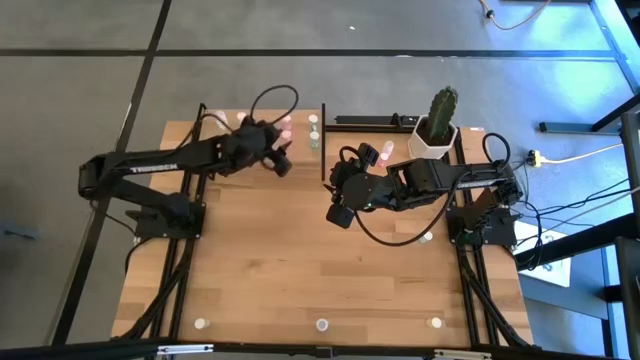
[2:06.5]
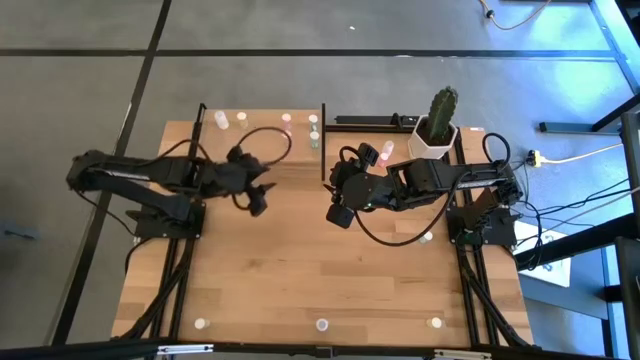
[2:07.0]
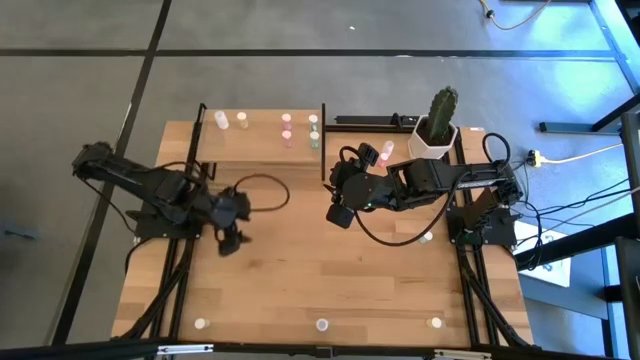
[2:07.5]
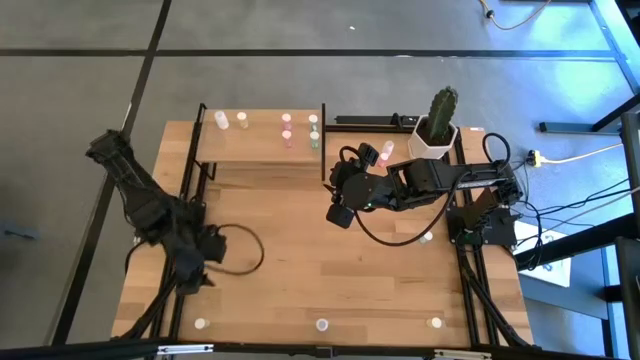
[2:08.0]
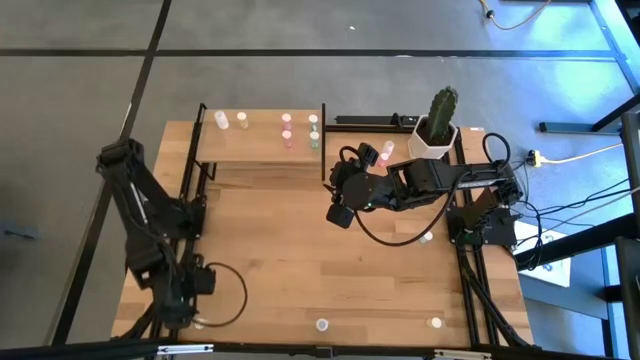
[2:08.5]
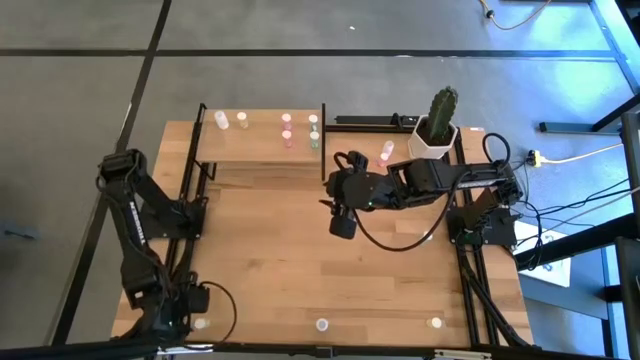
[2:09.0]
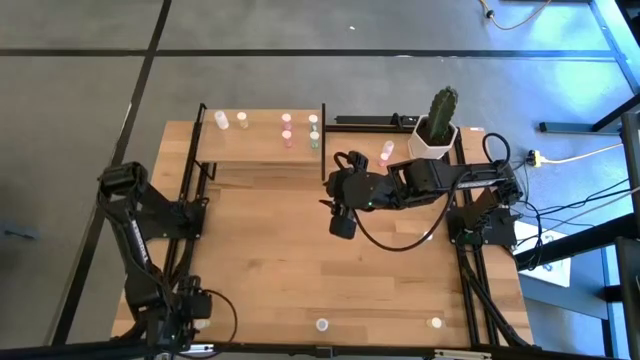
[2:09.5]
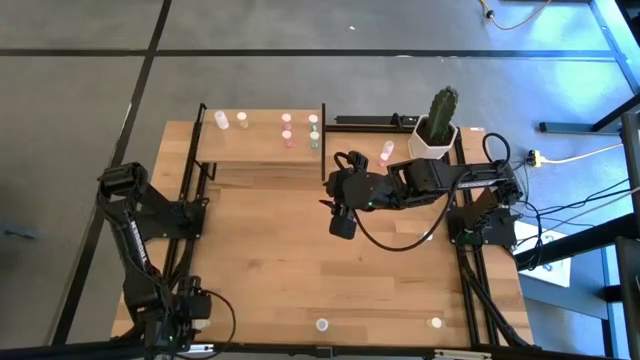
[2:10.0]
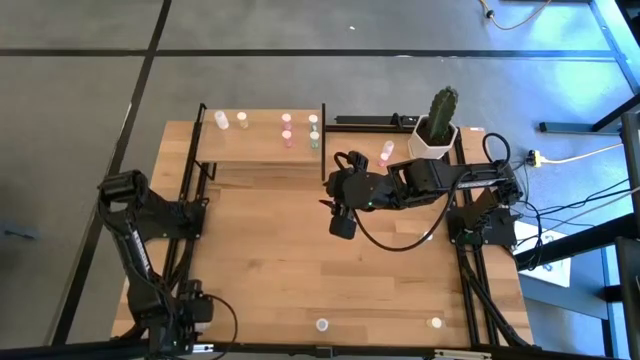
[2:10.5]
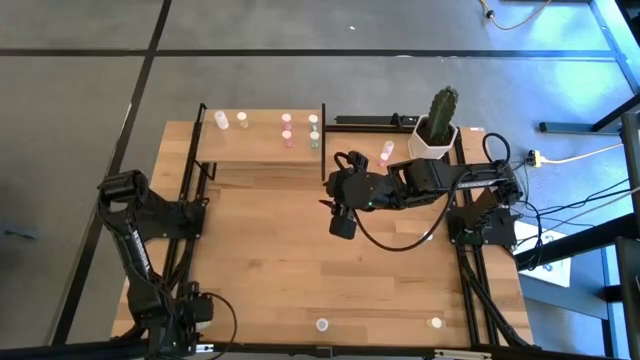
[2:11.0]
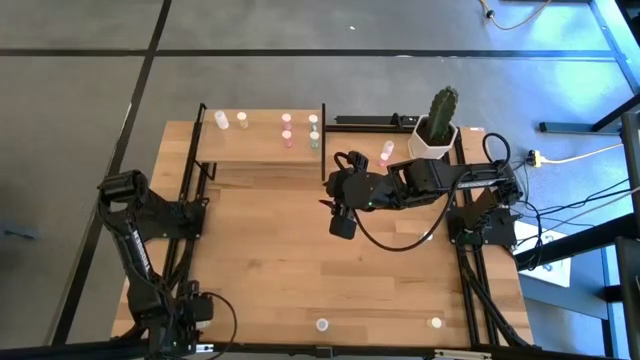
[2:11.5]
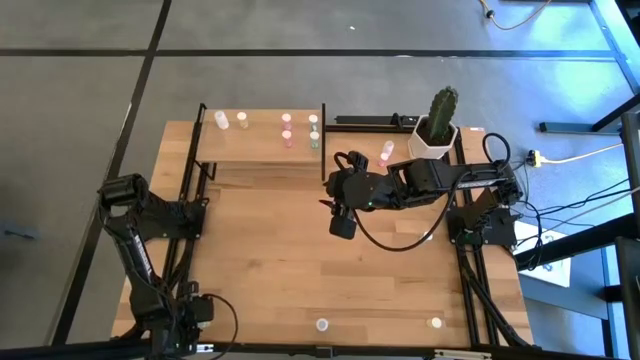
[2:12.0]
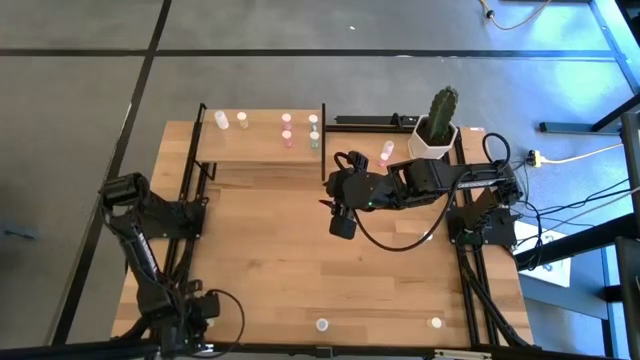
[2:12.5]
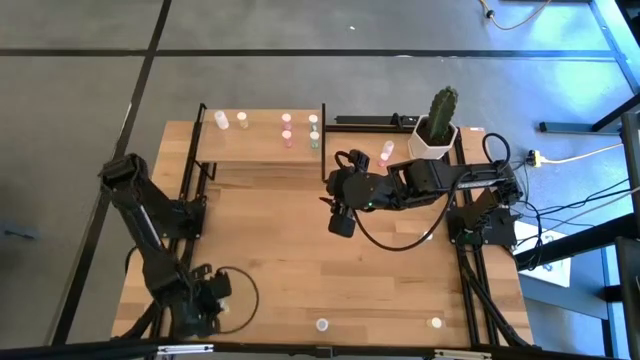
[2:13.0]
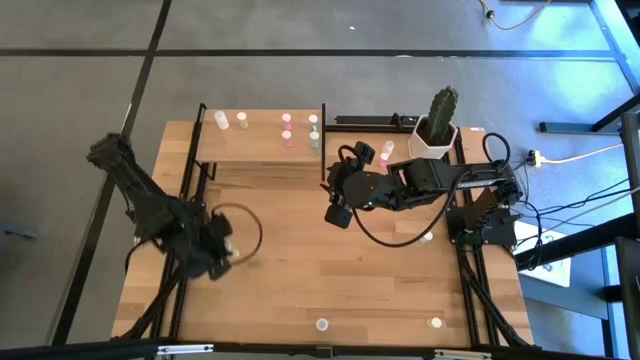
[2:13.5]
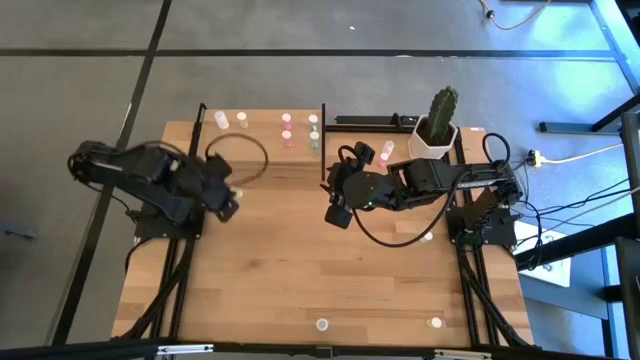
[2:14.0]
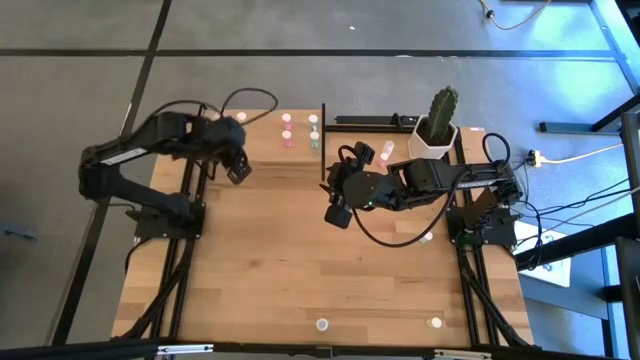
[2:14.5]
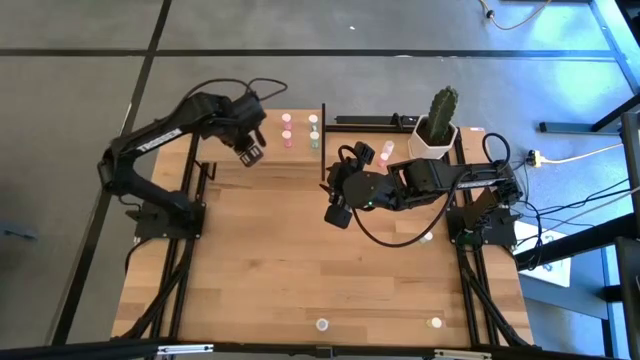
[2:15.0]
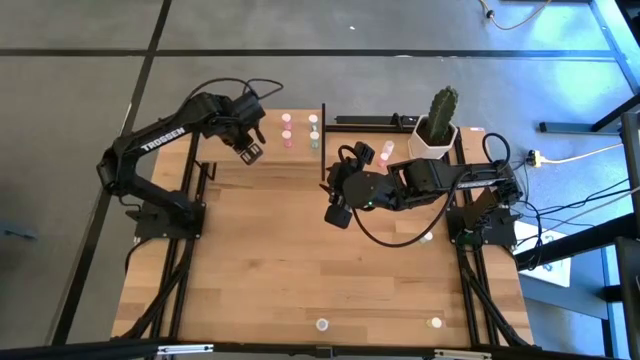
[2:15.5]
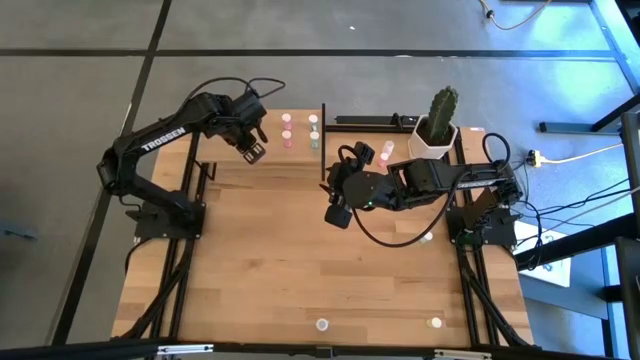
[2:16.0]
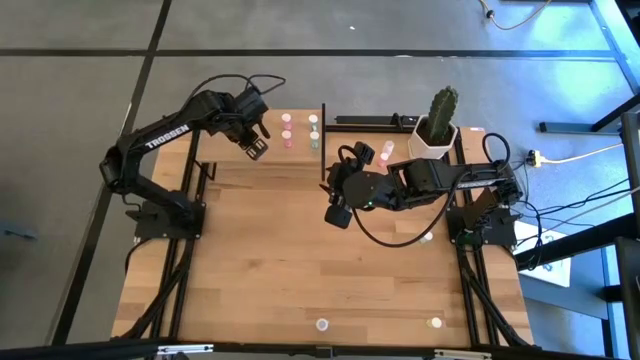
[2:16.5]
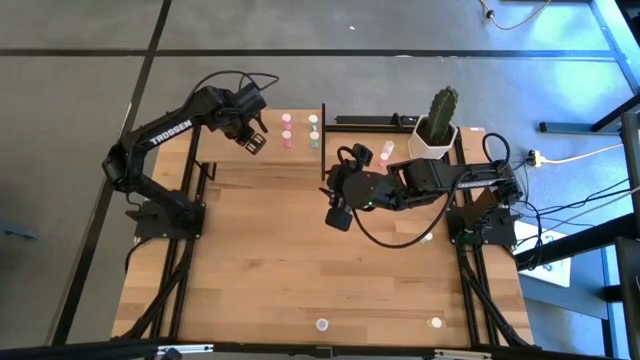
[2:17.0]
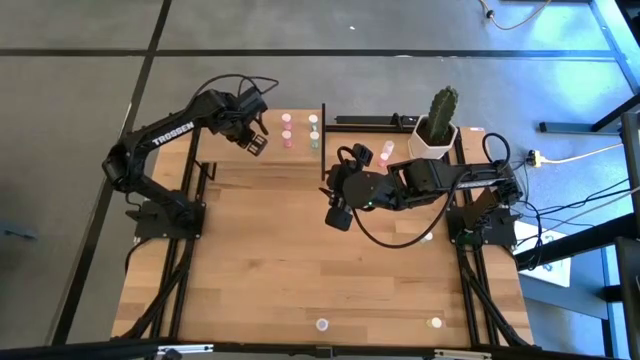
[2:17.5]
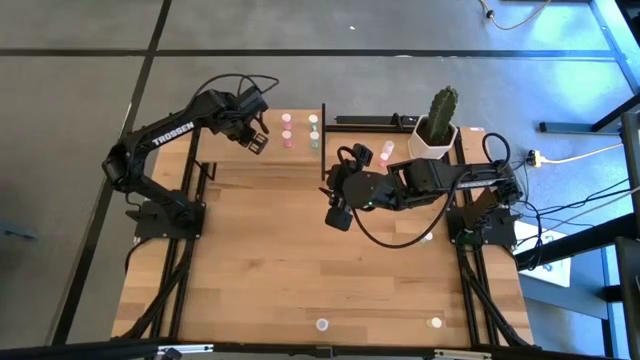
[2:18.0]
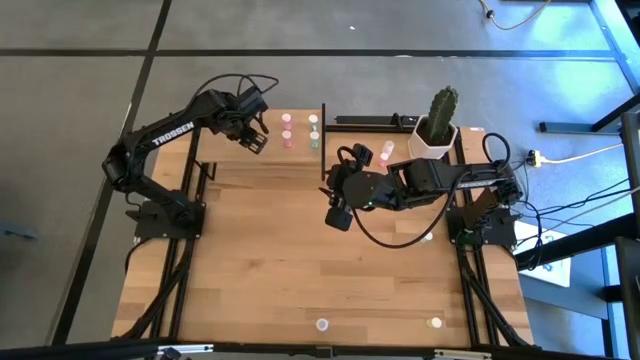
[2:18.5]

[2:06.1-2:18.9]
Task: Pick and place medicine bottles onto shelf by color
Put the left yellow pill bottle on the shelf and align it with the other yellow pill bottle

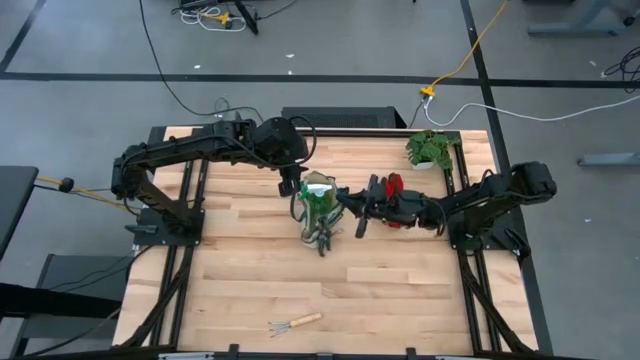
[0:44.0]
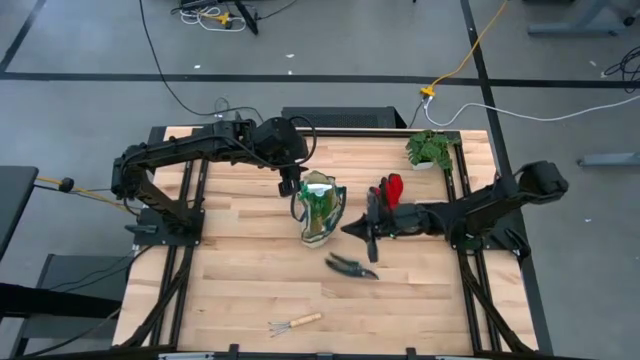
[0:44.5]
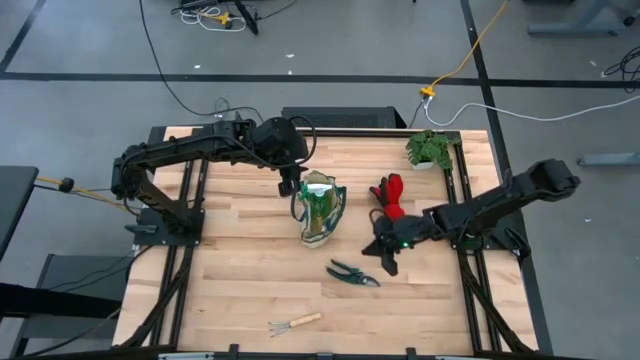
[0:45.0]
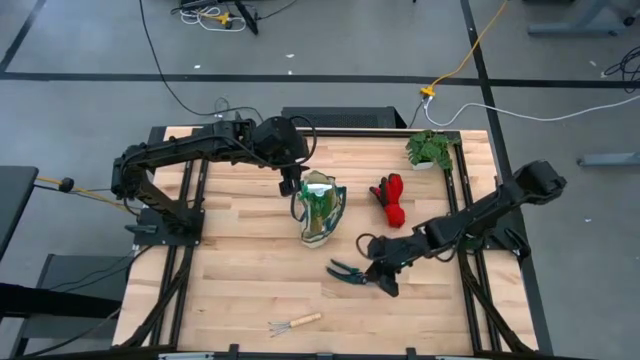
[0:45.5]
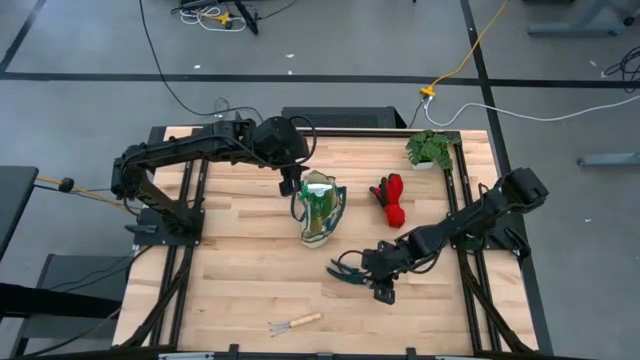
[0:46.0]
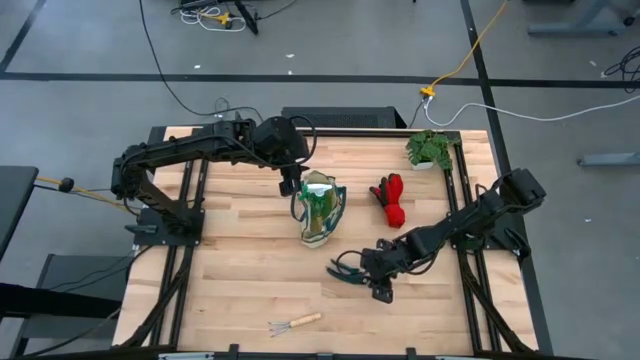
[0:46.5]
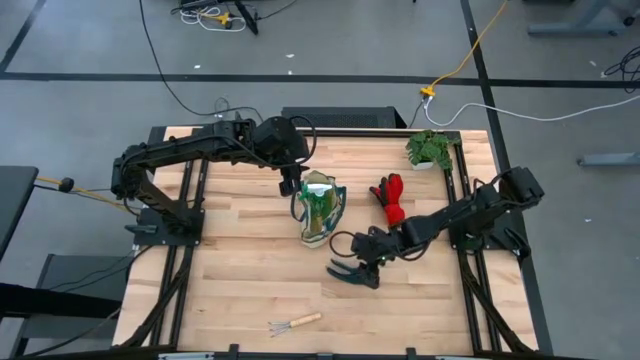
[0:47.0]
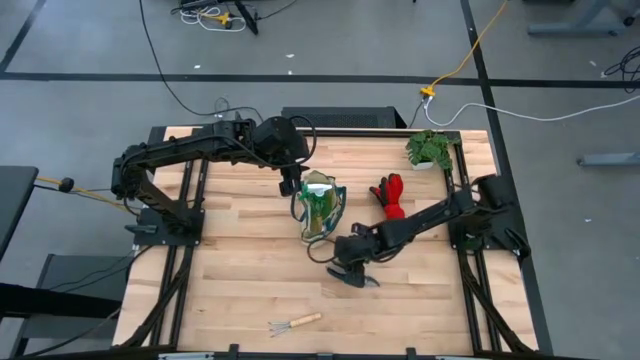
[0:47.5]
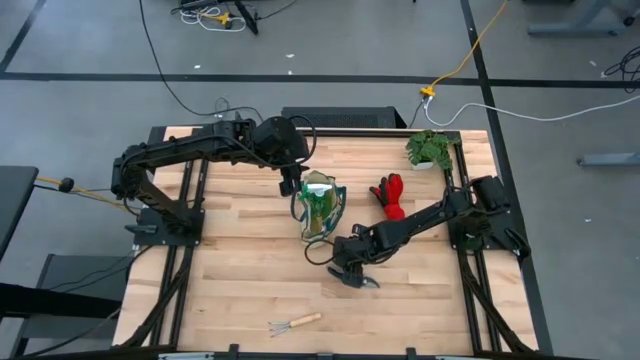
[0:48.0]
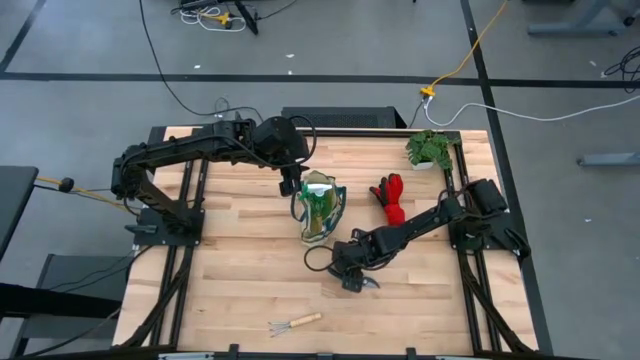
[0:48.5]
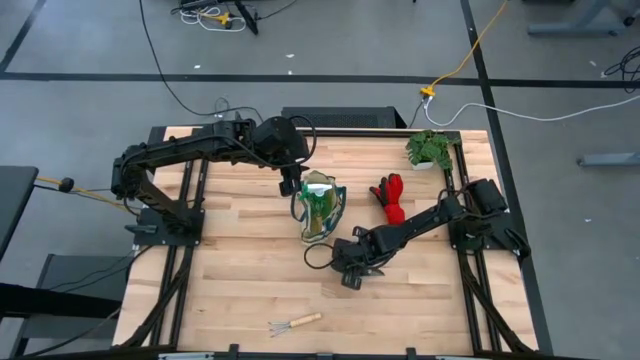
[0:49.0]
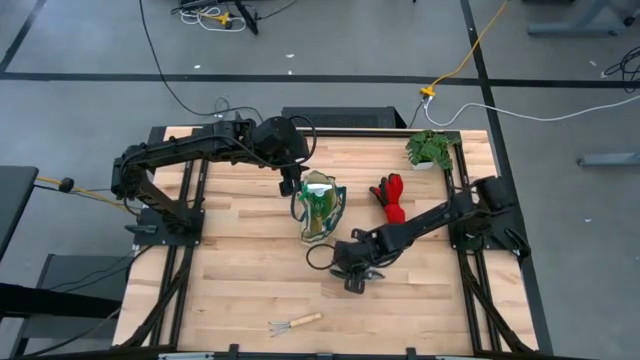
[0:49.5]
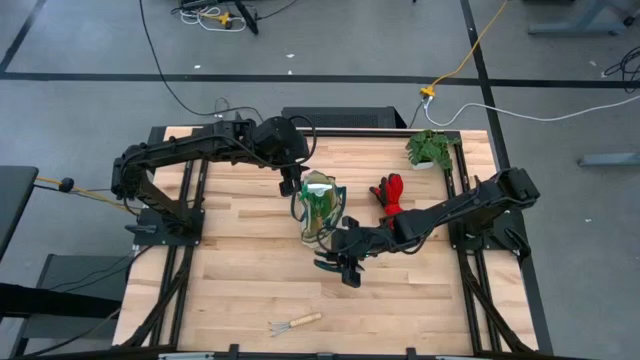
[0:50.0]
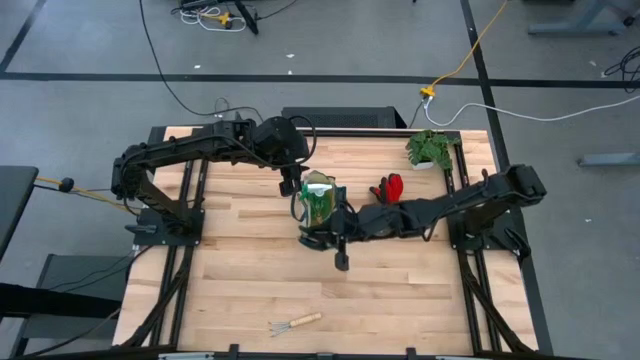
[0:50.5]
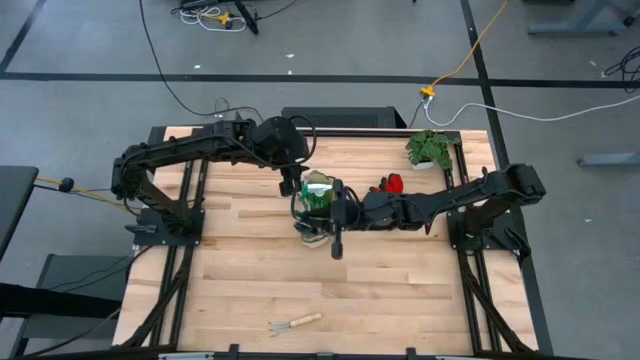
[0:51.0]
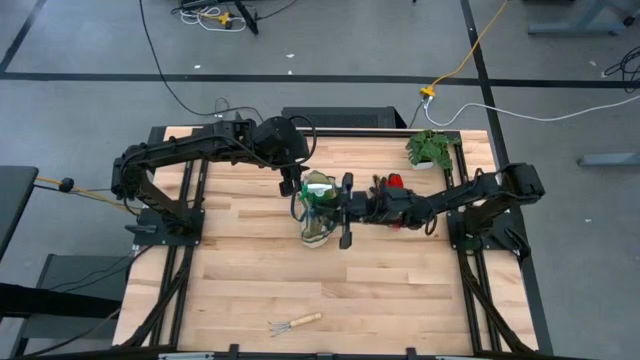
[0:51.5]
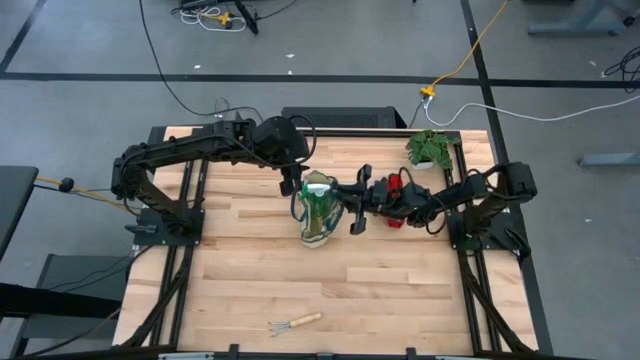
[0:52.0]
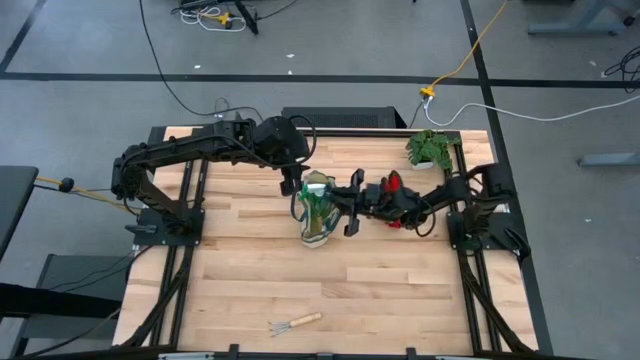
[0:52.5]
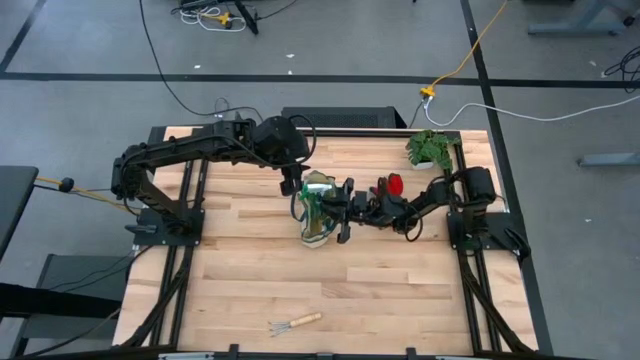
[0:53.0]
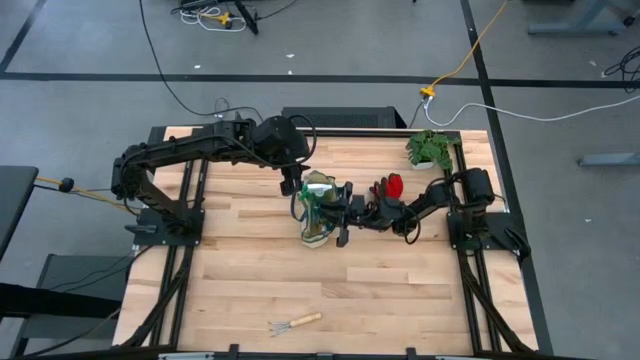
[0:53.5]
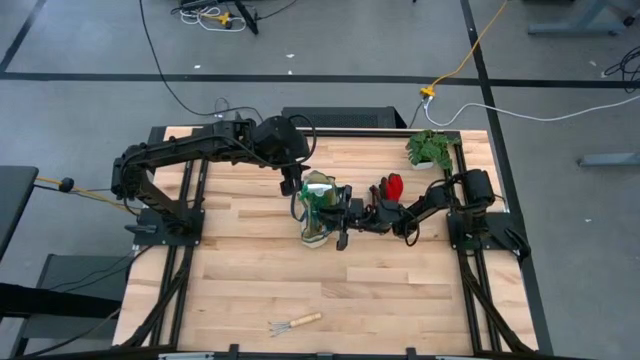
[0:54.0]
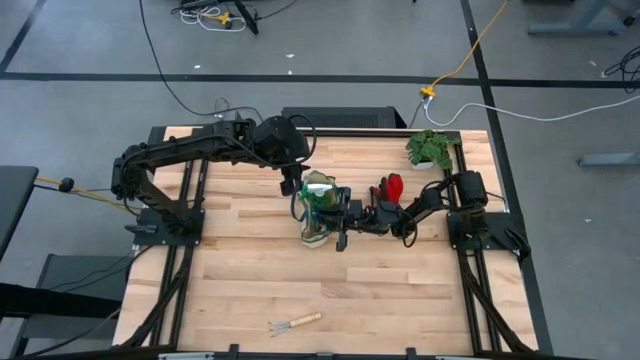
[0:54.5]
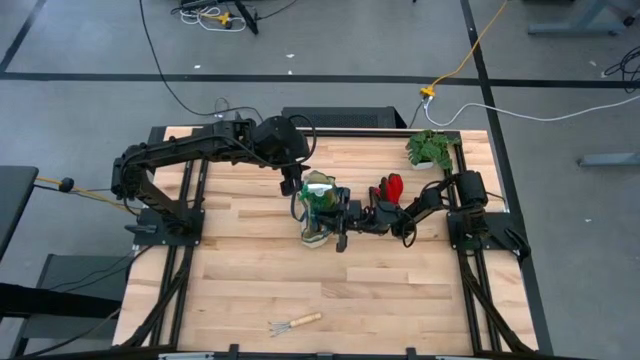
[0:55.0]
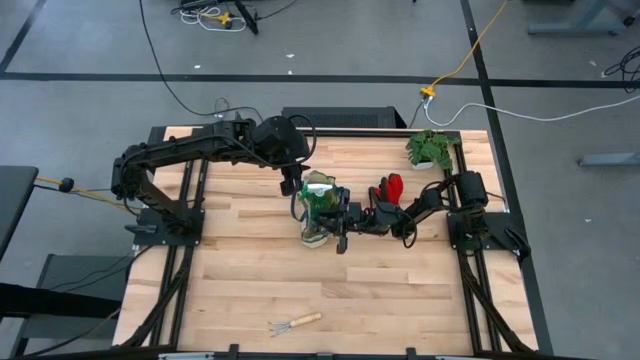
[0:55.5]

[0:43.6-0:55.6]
Task: Pick & Place Garden tools in Gardening bag
Put the green shear scissors into the brown gardening bag
